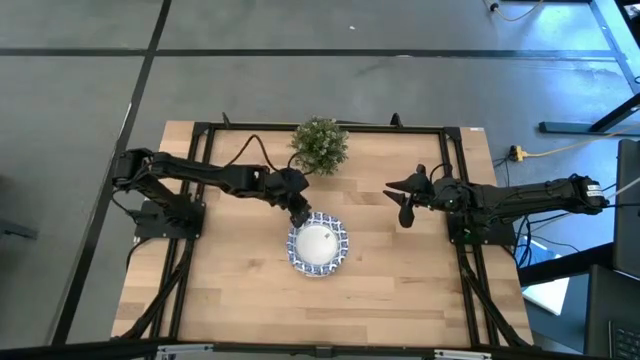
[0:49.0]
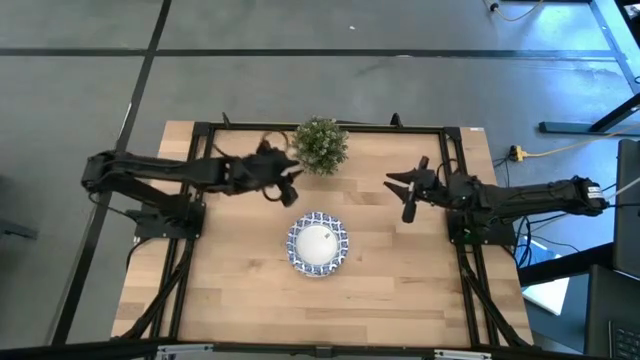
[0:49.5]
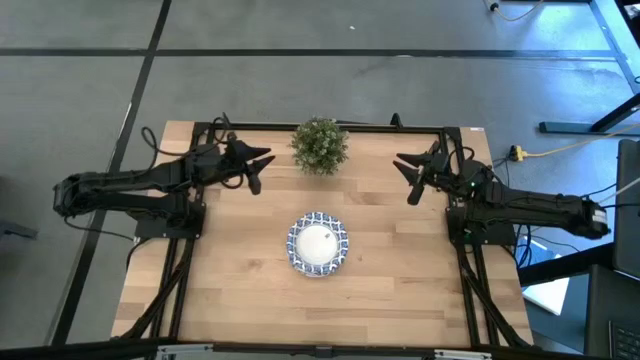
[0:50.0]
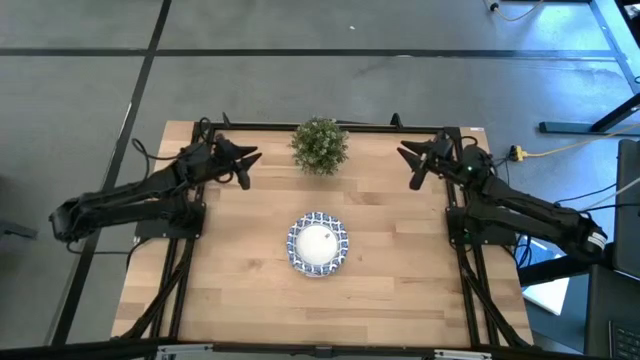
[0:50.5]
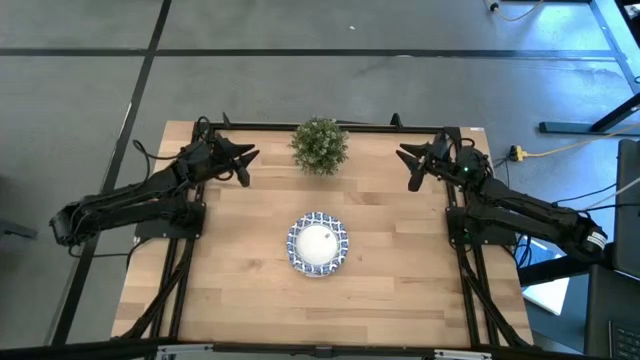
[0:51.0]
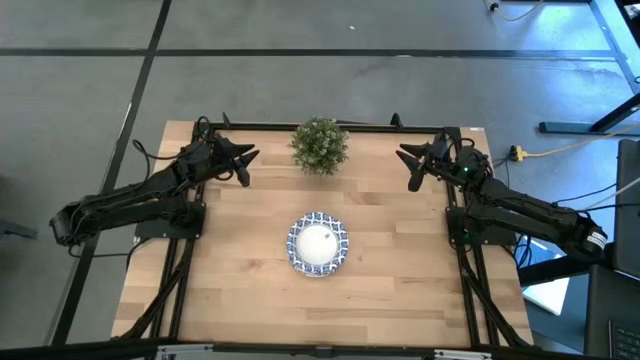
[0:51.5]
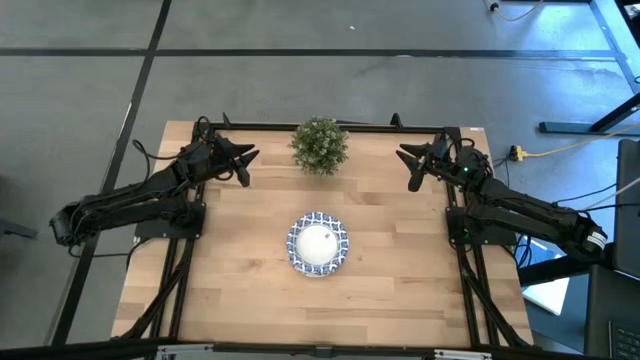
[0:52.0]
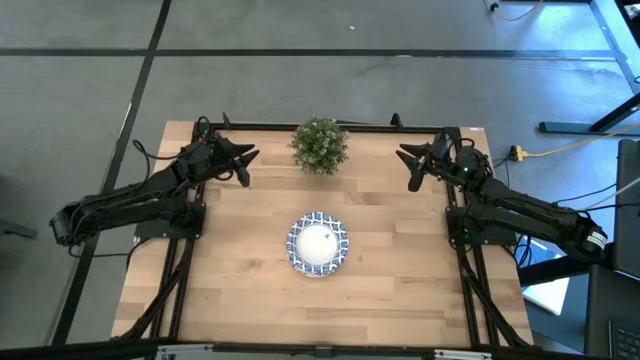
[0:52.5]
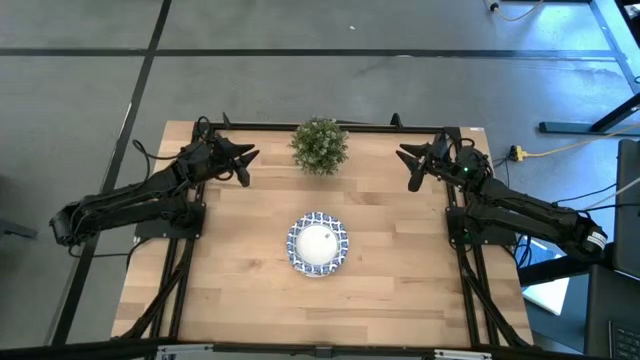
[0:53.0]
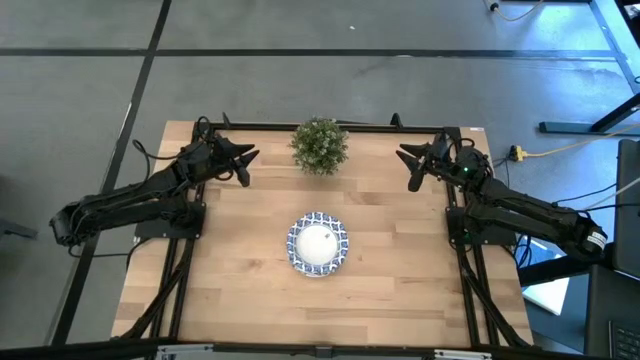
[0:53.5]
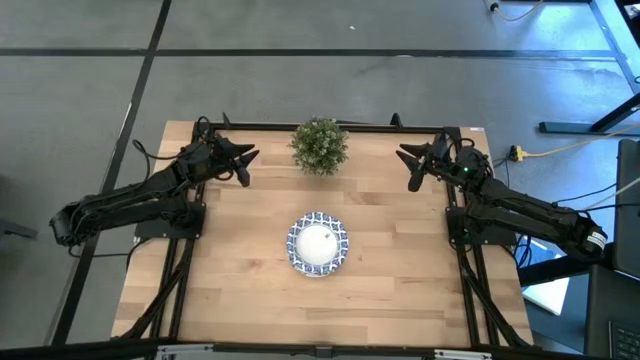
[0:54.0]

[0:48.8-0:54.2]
Task: Nest bowls inside each other
Return to Home Position

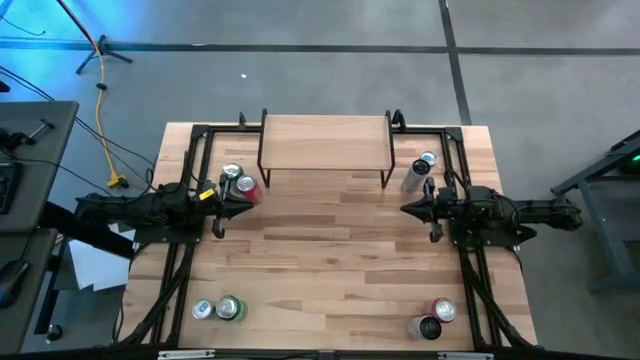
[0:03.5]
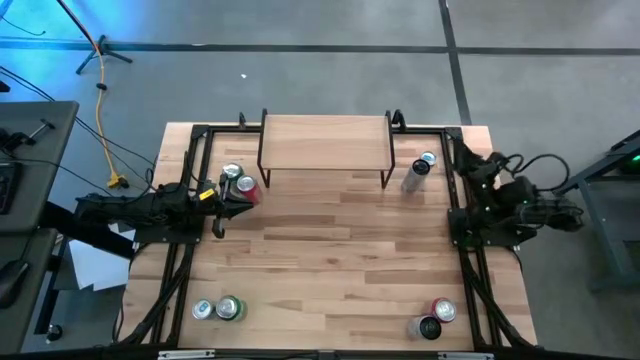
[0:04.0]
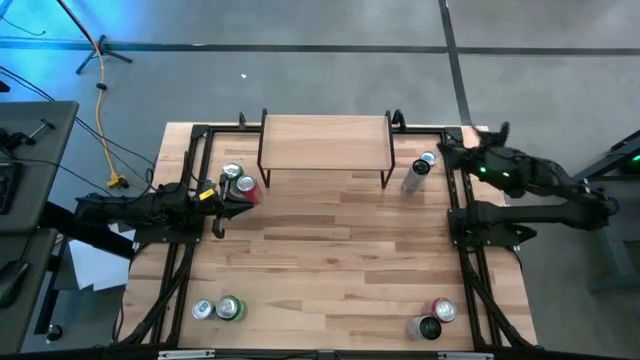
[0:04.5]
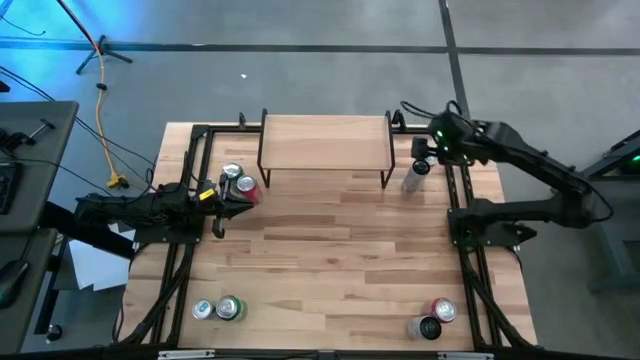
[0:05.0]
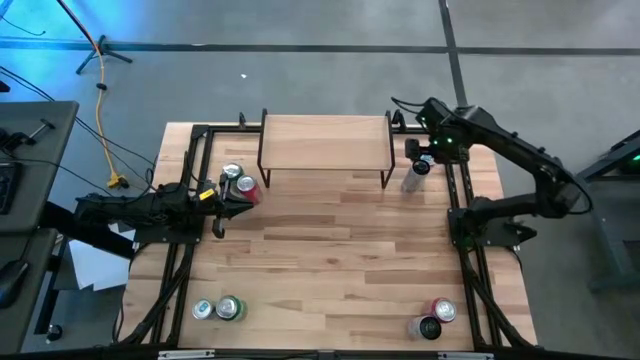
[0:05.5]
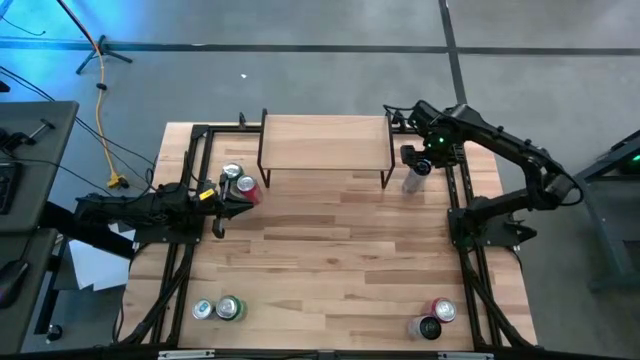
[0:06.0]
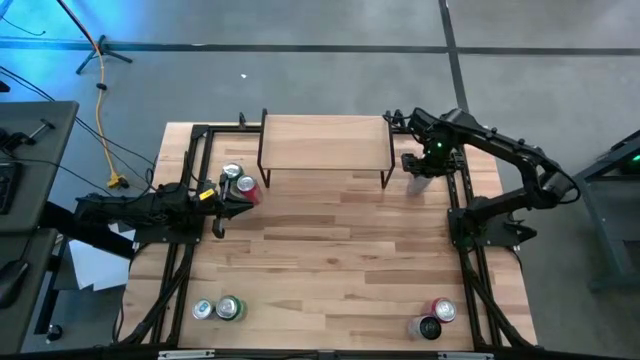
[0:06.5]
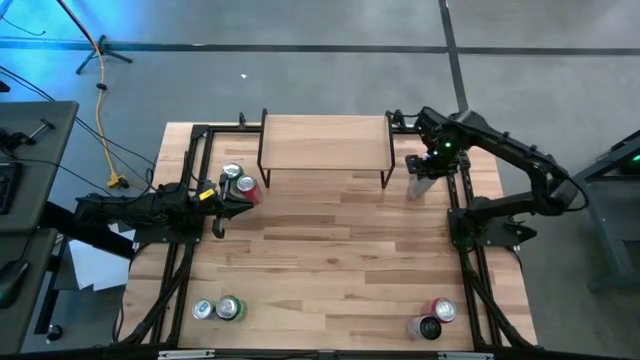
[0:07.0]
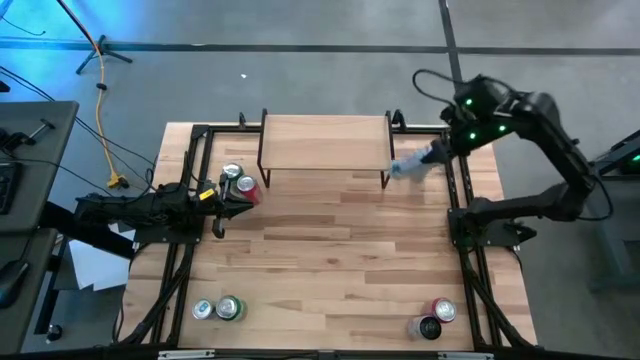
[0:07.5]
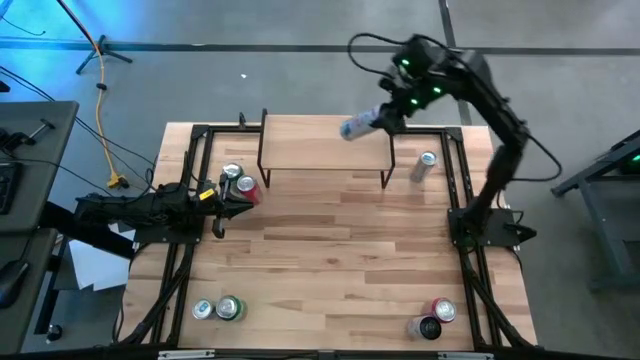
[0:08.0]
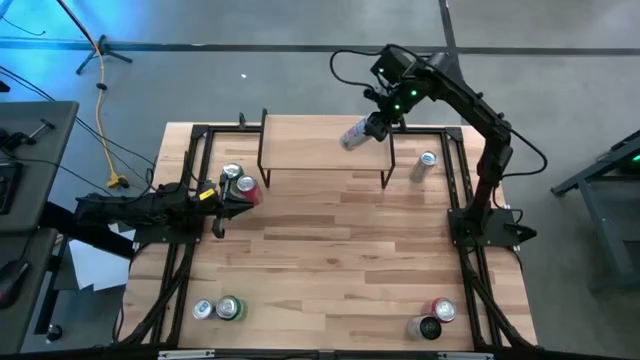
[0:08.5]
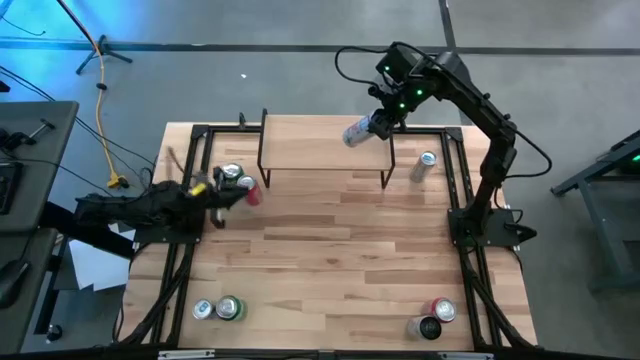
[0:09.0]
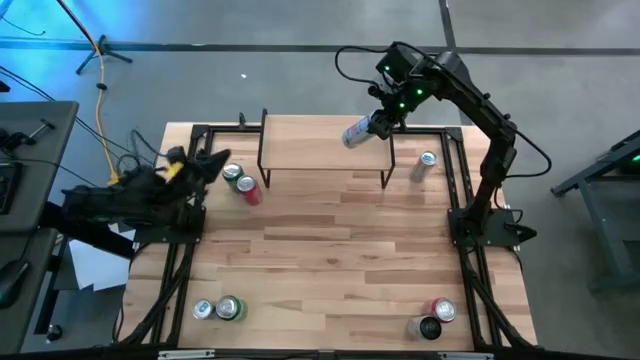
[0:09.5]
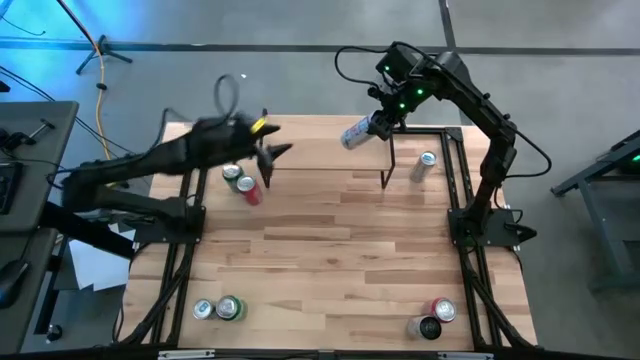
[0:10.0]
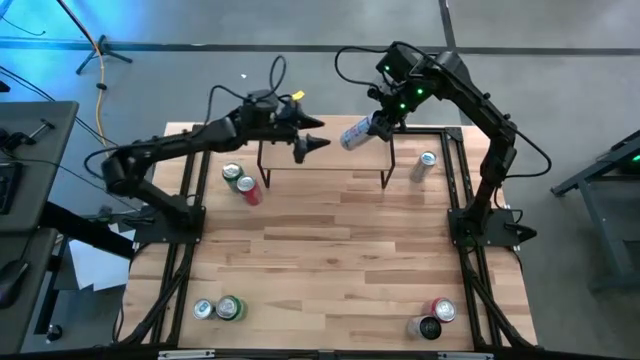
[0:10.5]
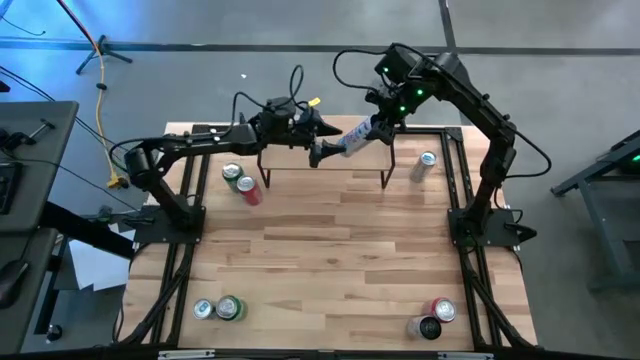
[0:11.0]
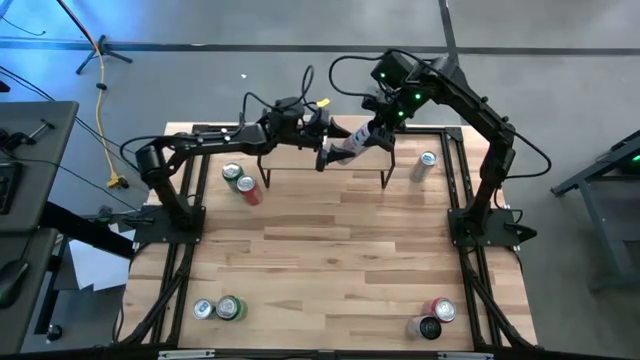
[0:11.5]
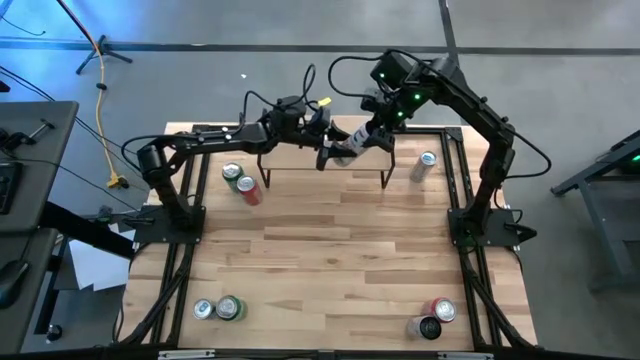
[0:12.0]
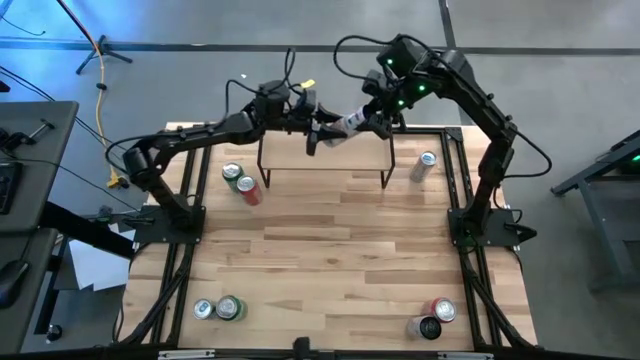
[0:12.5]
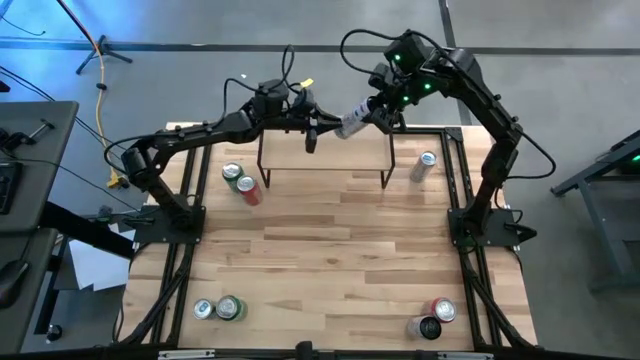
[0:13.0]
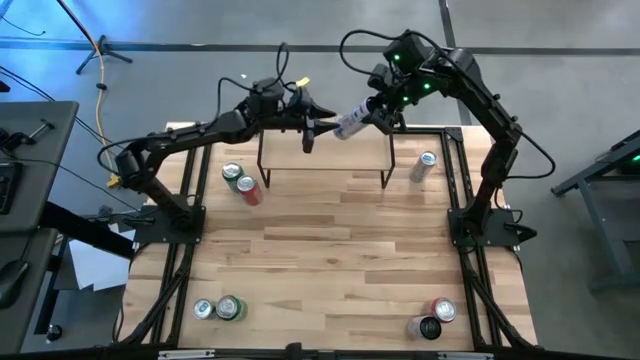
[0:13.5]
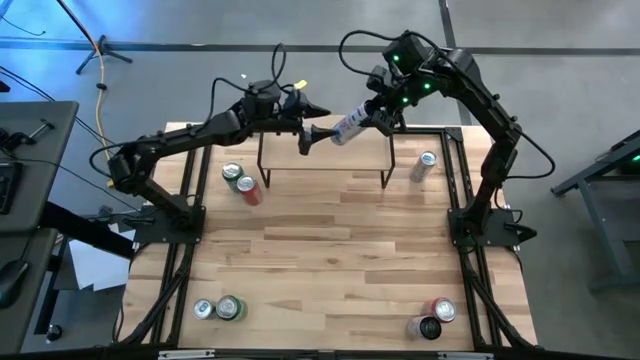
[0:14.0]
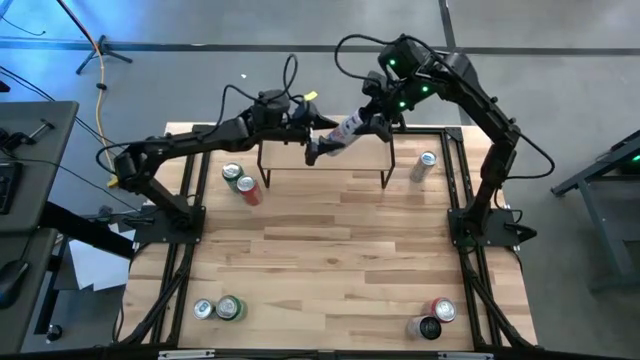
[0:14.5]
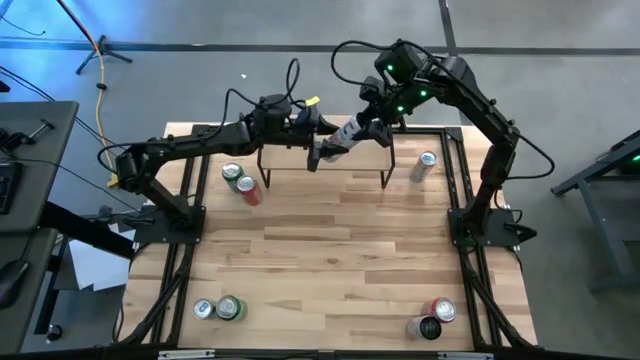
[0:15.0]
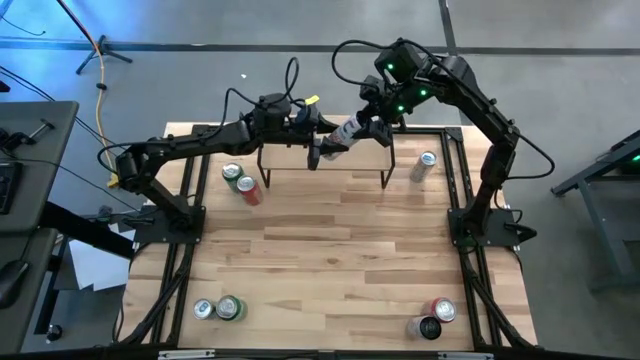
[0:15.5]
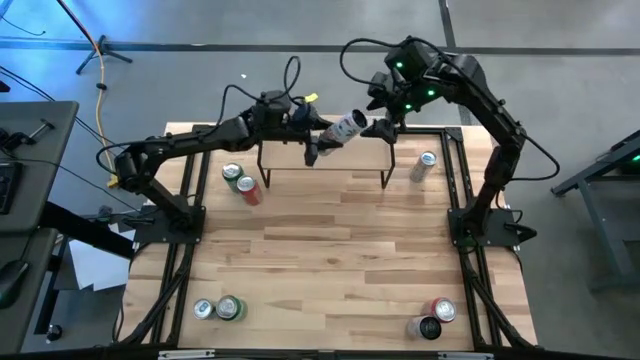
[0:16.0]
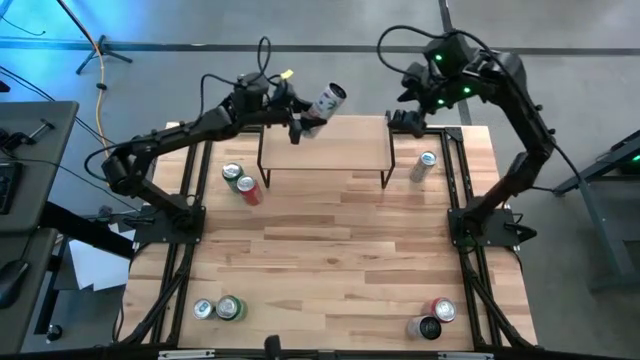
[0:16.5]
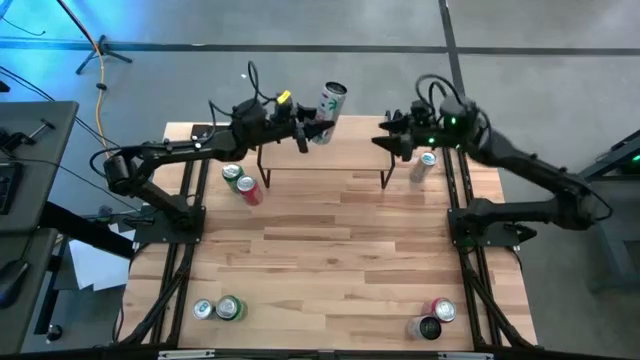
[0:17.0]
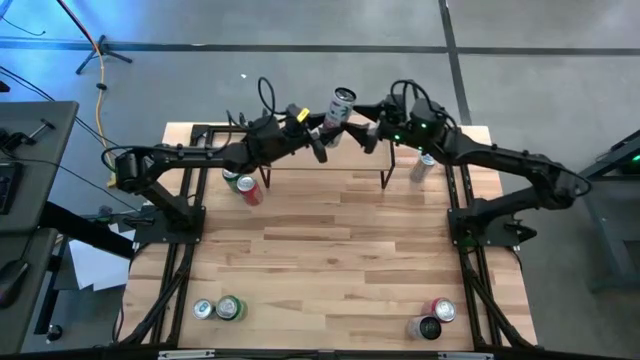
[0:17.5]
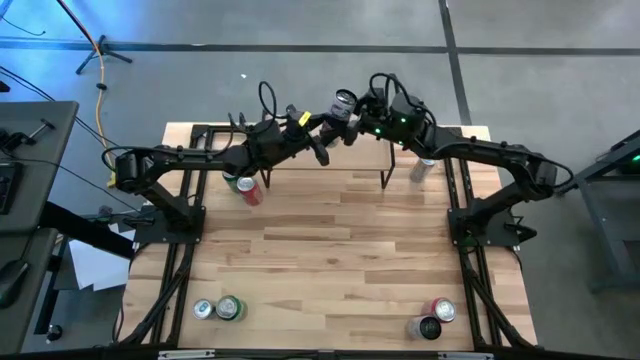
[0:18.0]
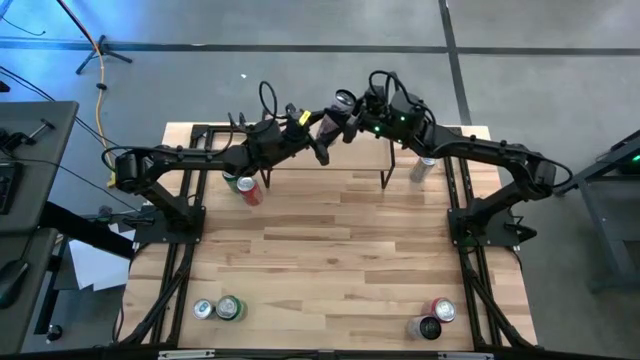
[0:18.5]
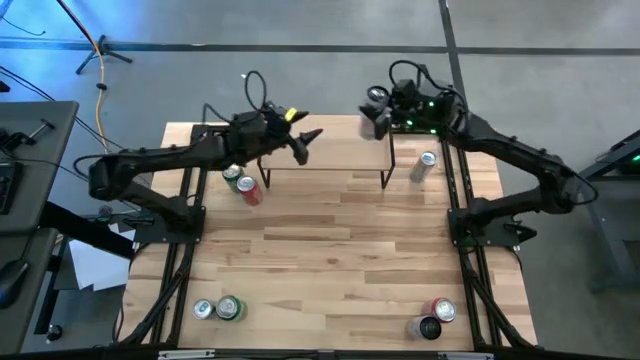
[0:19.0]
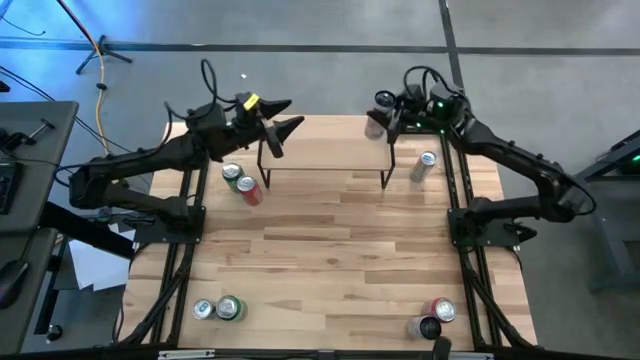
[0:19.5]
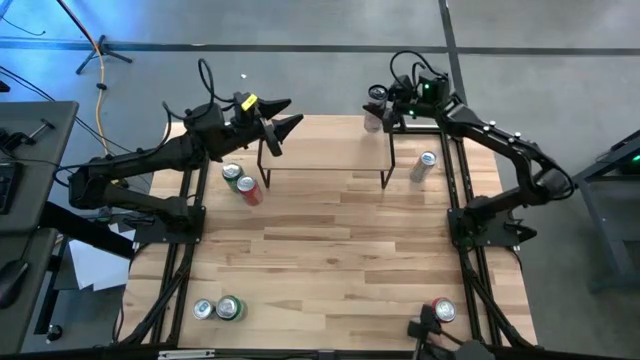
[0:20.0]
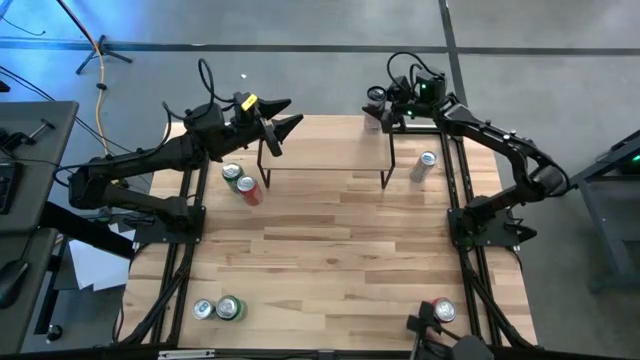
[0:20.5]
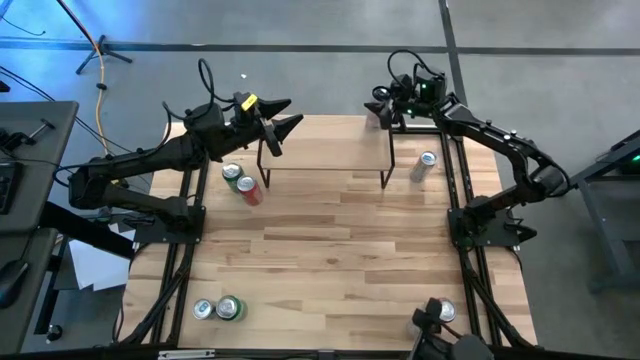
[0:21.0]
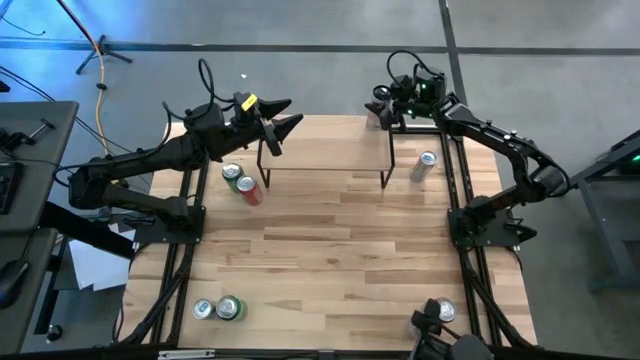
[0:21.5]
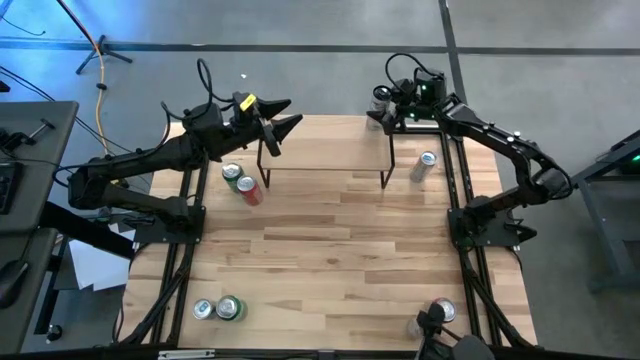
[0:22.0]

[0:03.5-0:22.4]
Task: Place canned beverage on shelf
Put the top white pink soda can on the shelf
